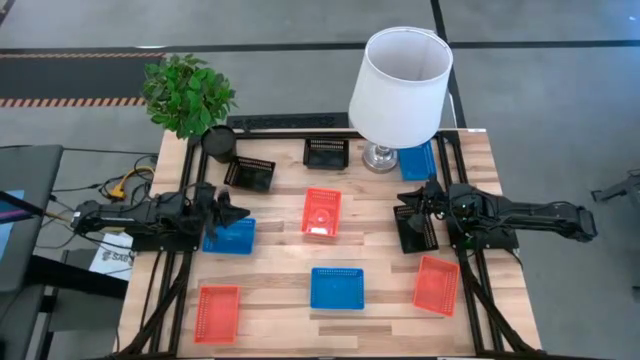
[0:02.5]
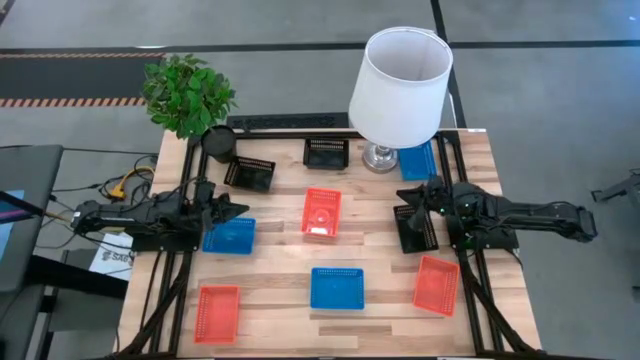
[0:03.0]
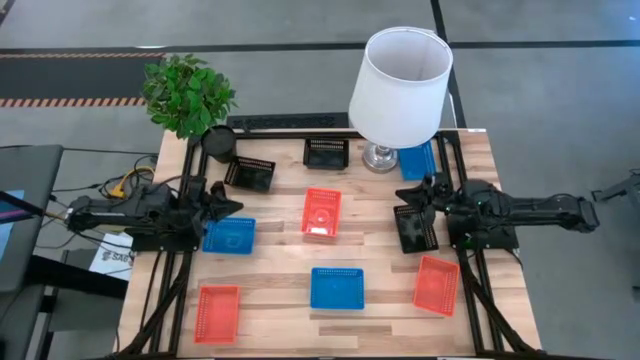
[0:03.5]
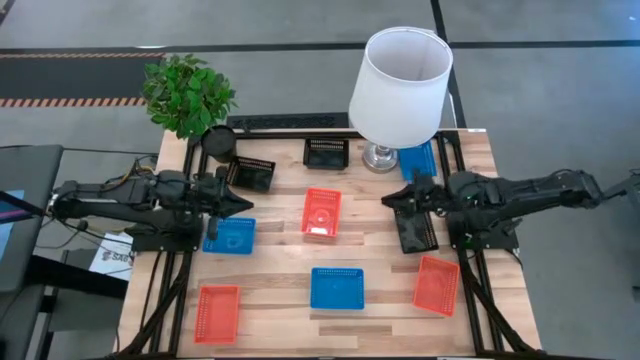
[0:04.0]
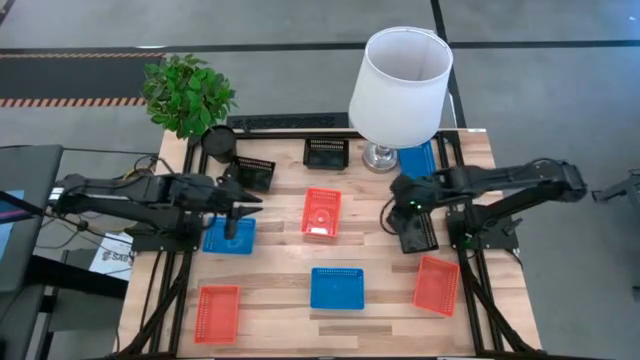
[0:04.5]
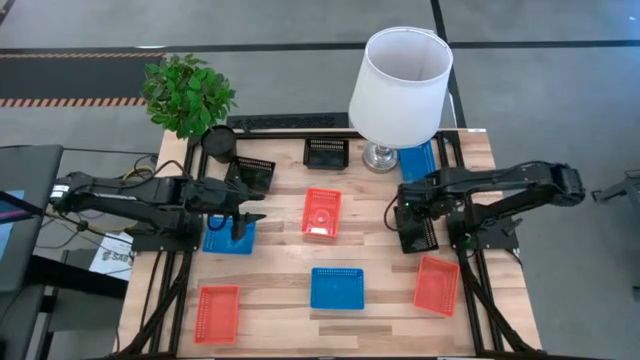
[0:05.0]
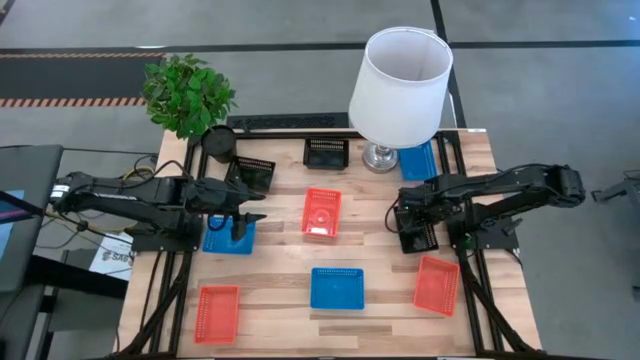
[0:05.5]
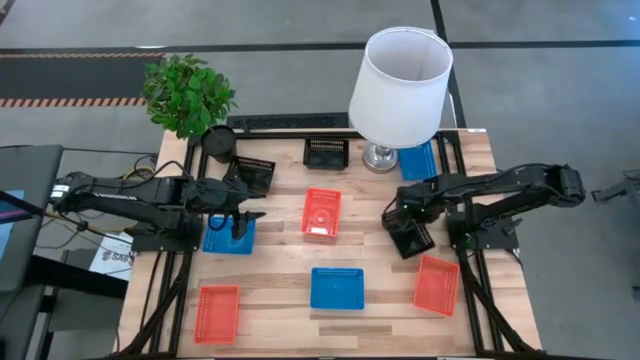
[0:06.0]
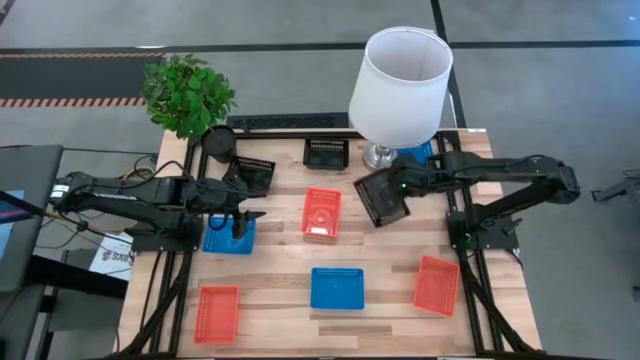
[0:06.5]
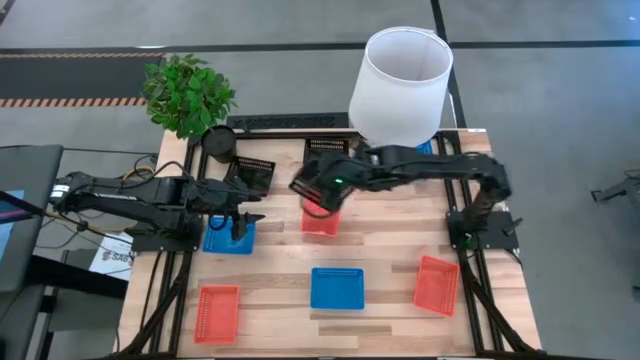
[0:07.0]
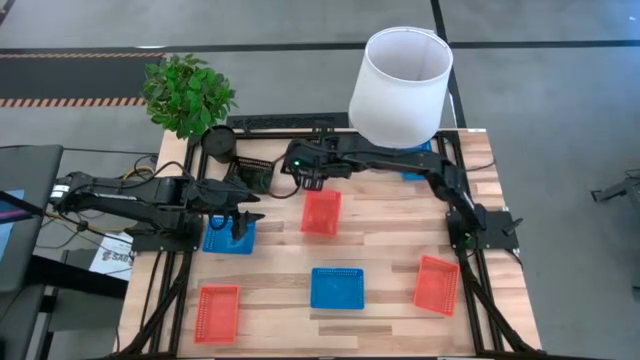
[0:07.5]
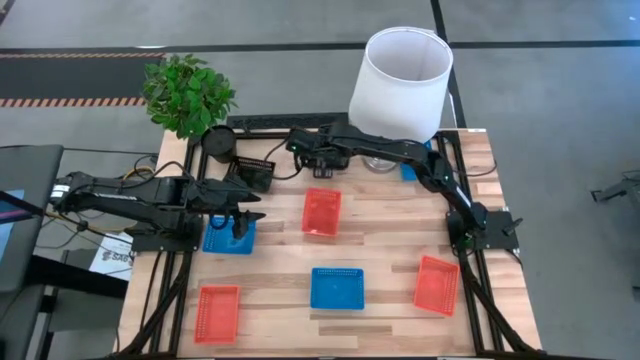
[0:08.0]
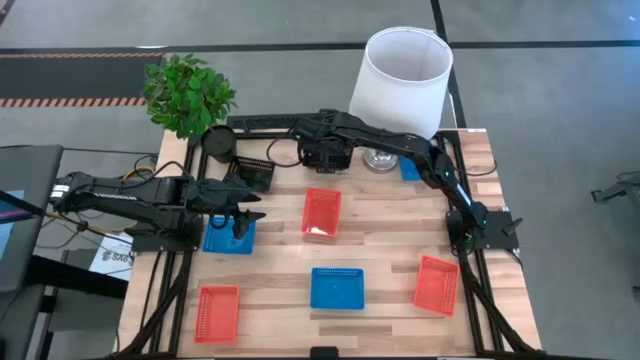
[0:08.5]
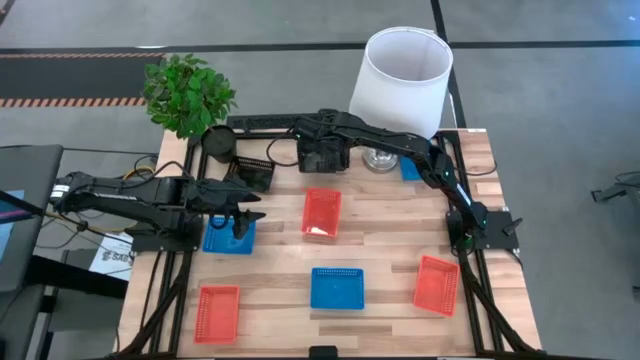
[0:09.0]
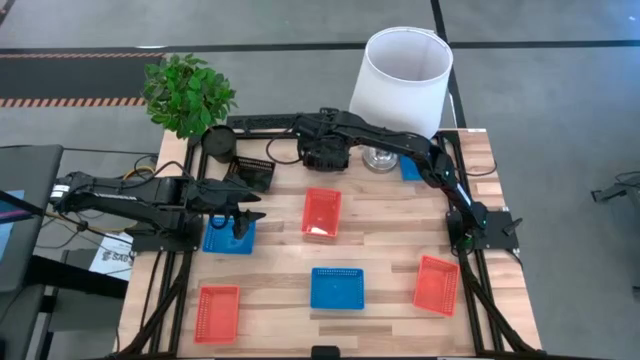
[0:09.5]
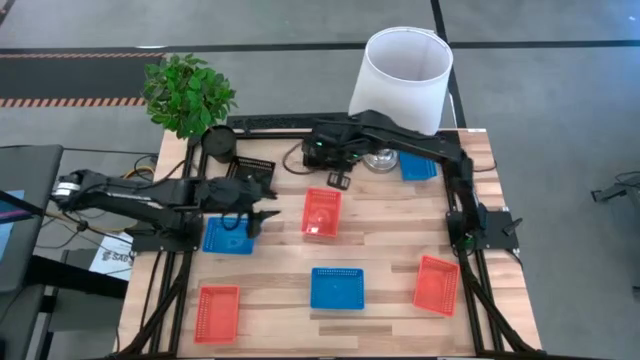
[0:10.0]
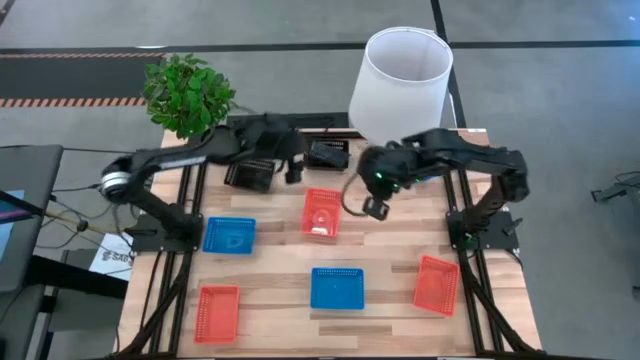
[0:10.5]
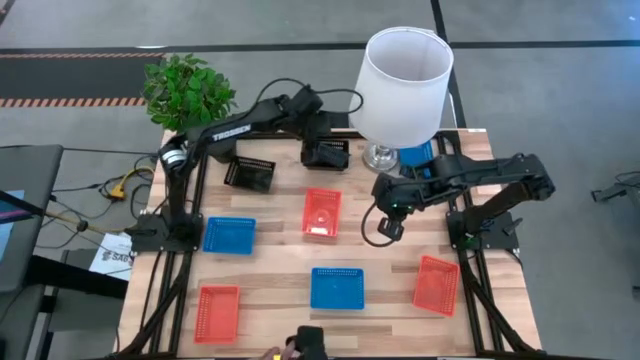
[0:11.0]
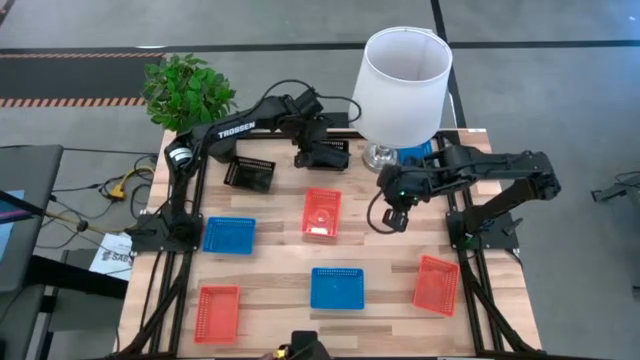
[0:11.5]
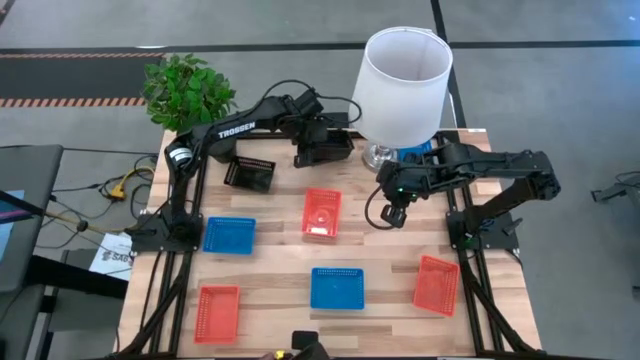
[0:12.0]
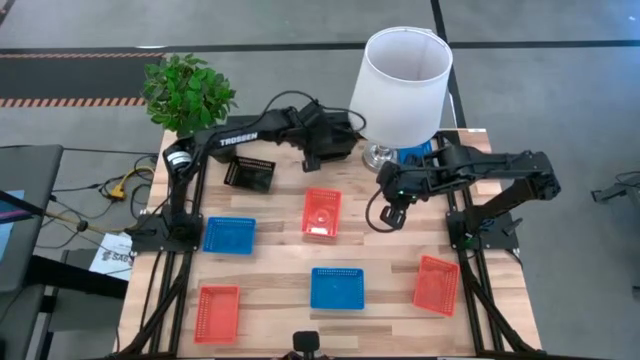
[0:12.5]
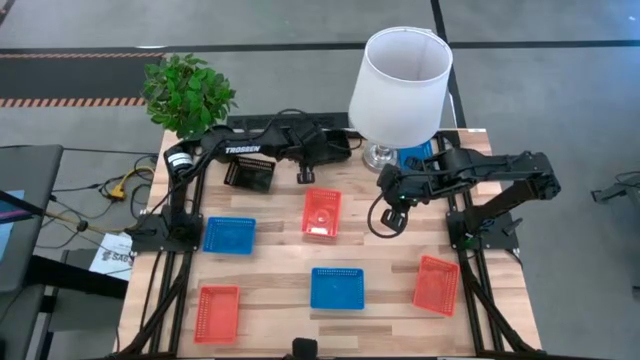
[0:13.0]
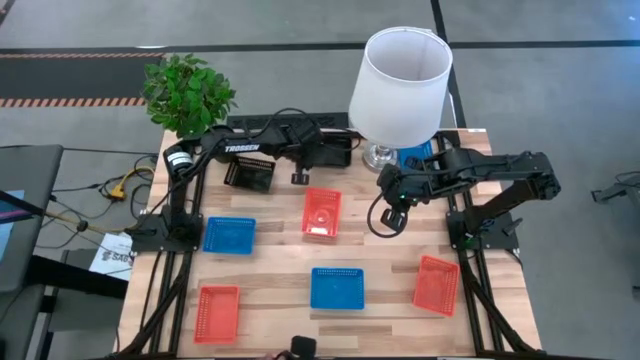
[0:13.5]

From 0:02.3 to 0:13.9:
Stack the bottom black bin on the top right black bin

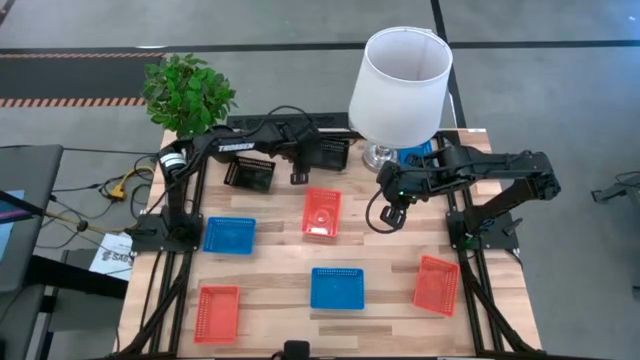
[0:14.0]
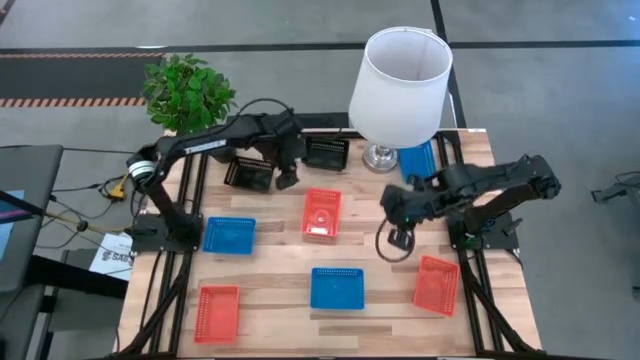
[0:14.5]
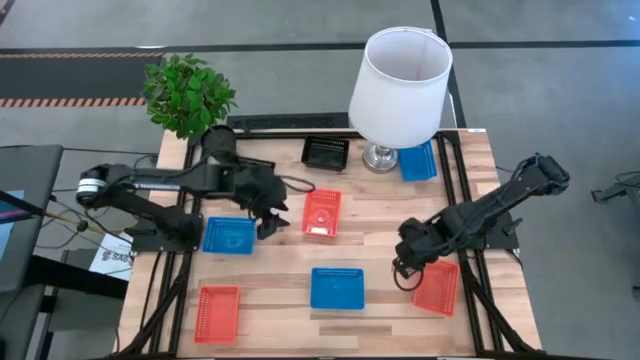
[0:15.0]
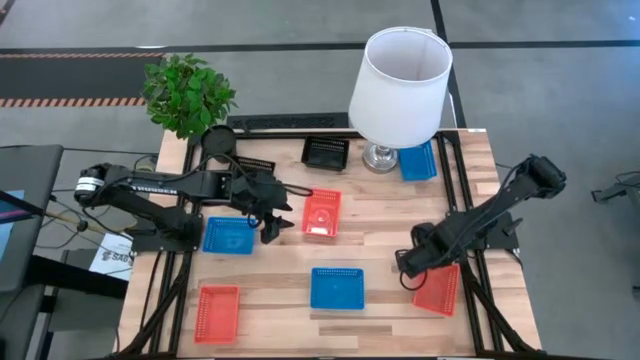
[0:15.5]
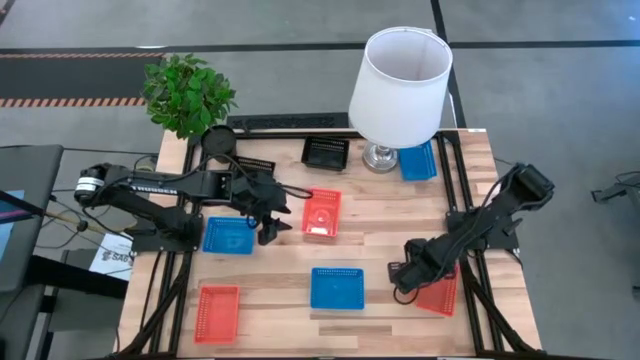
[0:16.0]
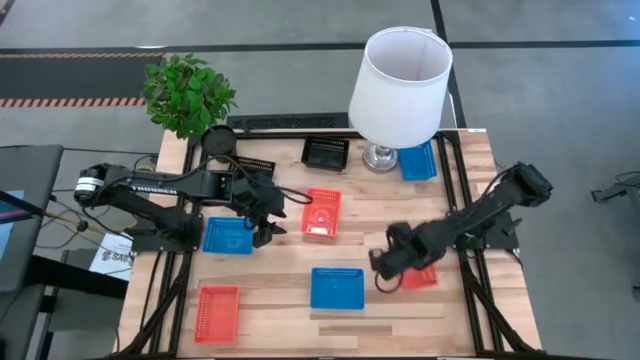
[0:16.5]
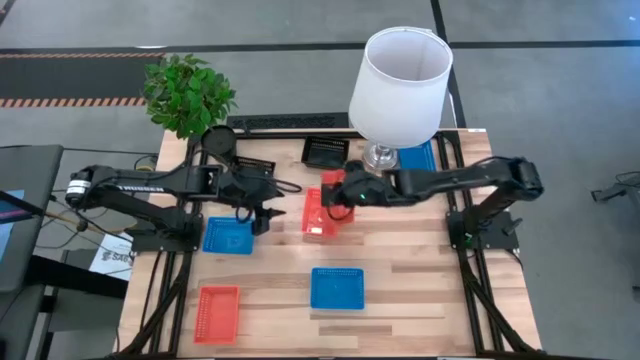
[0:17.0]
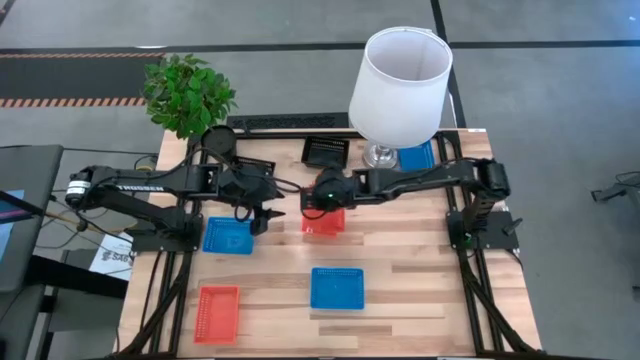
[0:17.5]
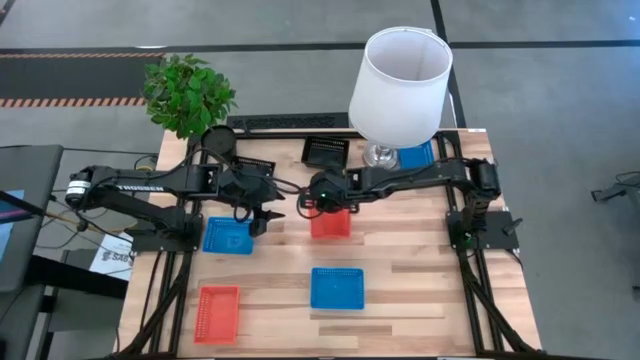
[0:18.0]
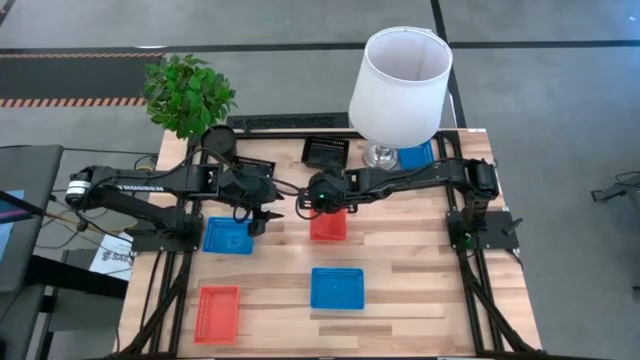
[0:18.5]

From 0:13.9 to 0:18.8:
Stack the bottom right orange bin on the top orange bin

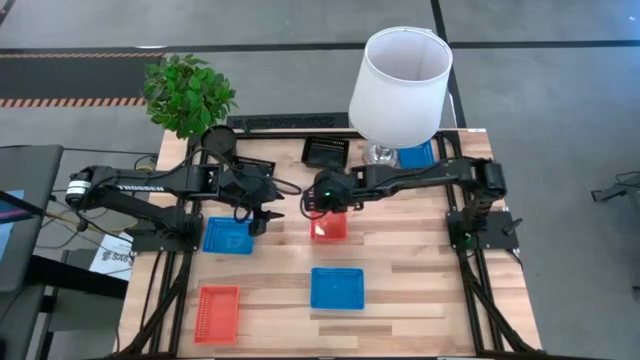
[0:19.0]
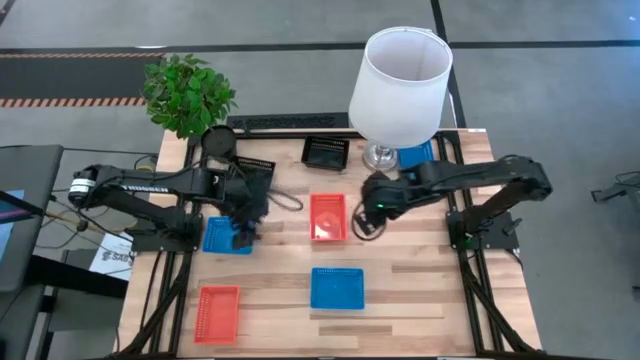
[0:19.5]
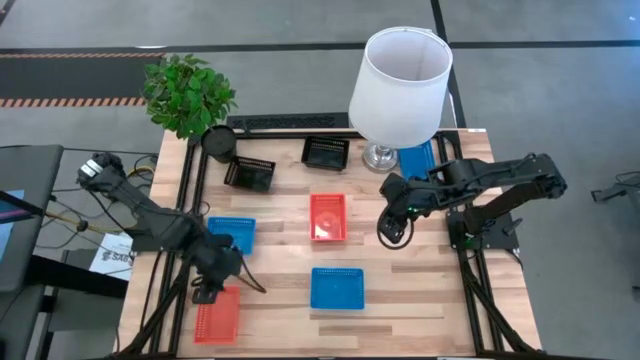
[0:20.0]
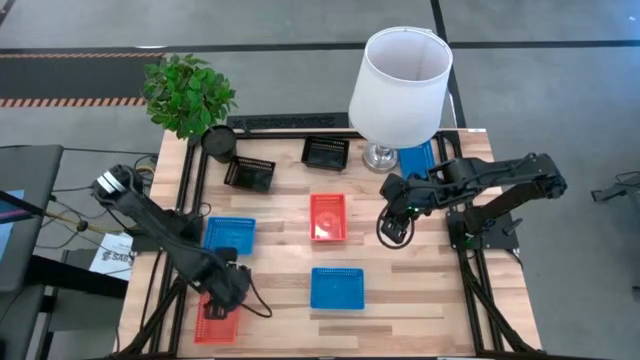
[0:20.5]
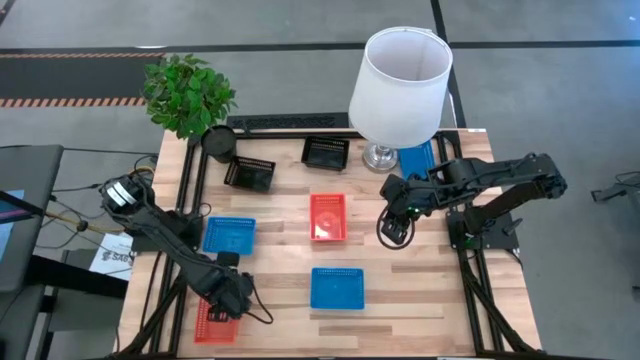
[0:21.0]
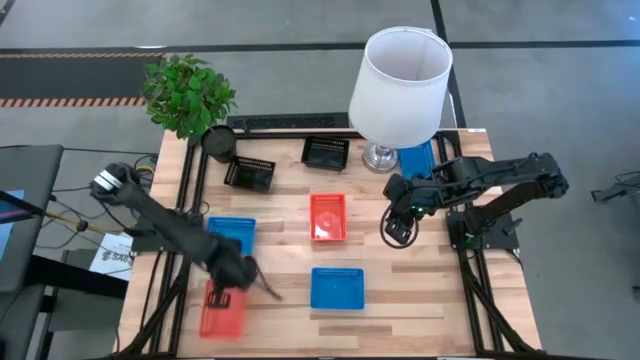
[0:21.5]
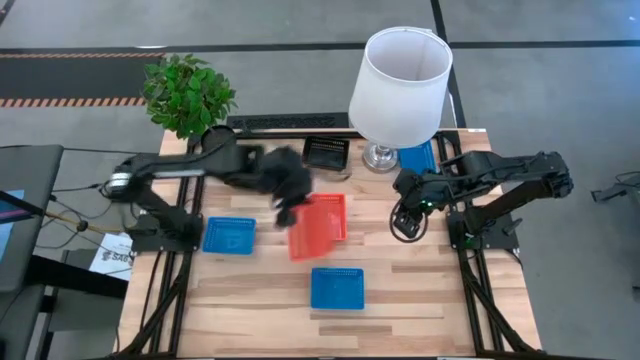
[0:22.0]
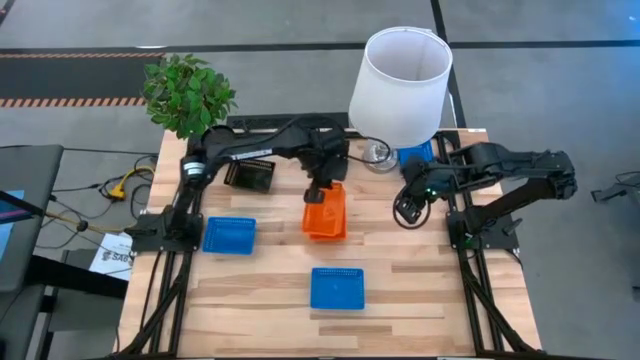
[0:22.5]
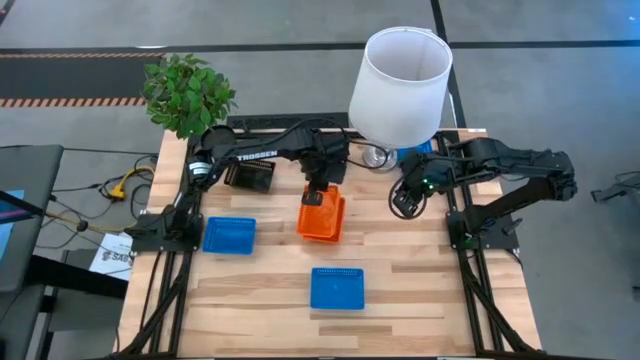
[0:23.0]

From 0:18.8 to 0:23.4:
Stack the bottom orange bin on the top orange bins
